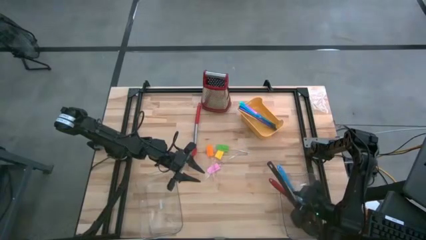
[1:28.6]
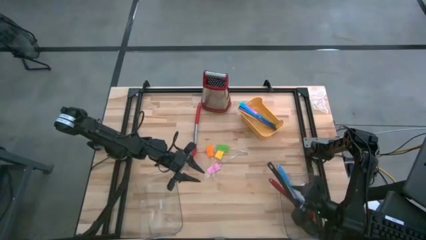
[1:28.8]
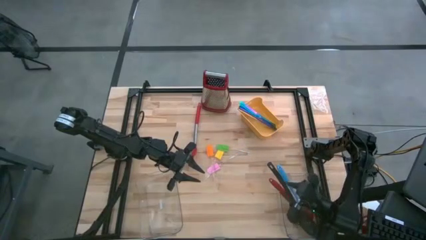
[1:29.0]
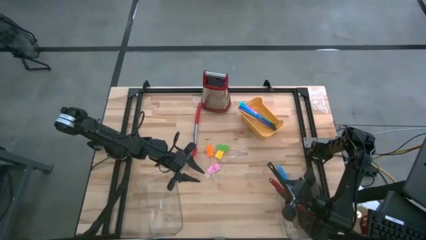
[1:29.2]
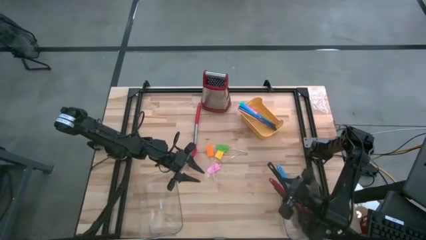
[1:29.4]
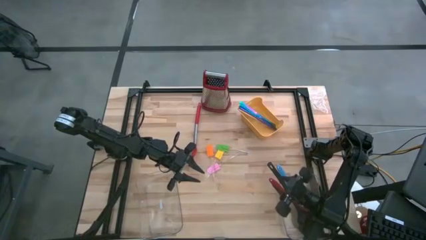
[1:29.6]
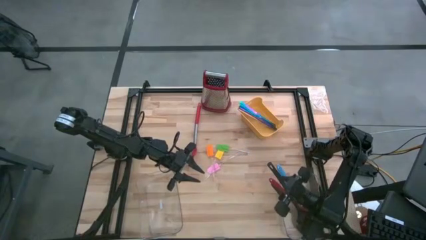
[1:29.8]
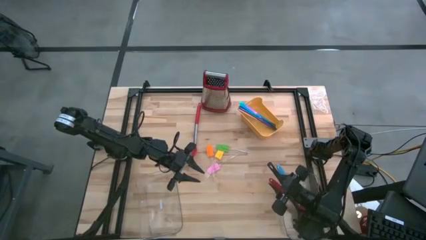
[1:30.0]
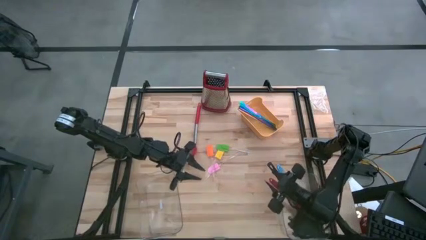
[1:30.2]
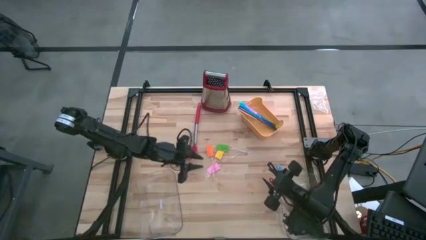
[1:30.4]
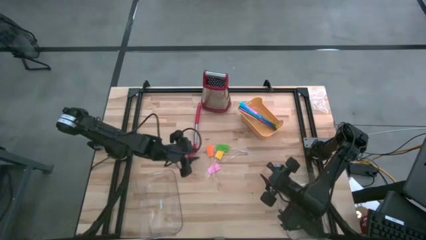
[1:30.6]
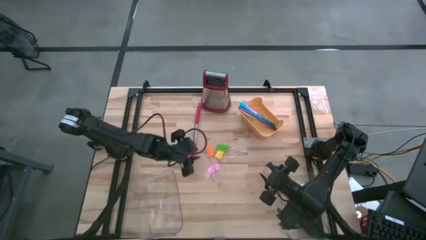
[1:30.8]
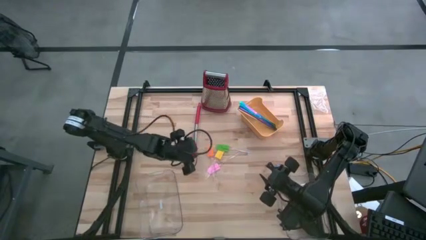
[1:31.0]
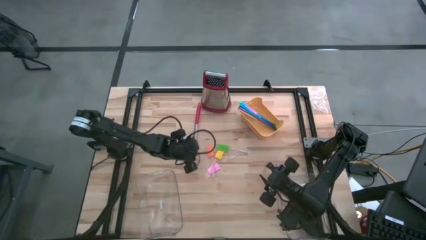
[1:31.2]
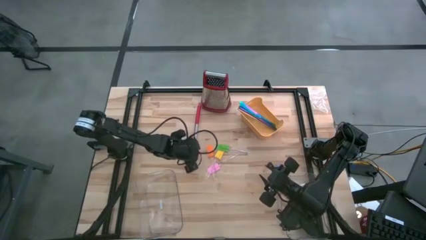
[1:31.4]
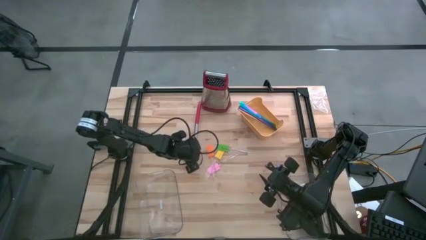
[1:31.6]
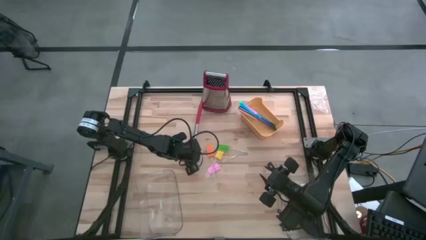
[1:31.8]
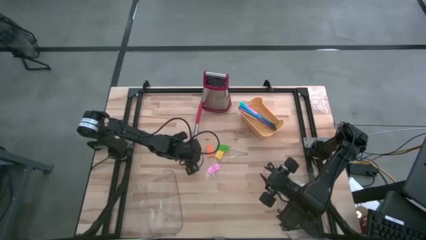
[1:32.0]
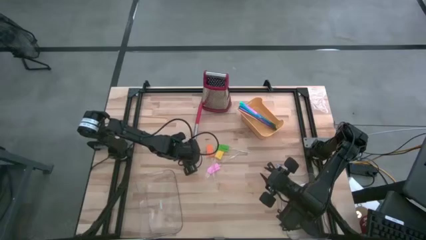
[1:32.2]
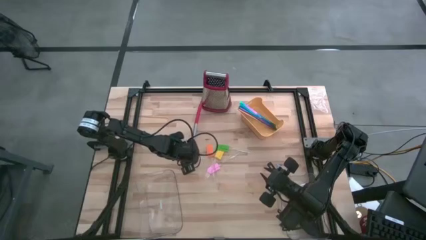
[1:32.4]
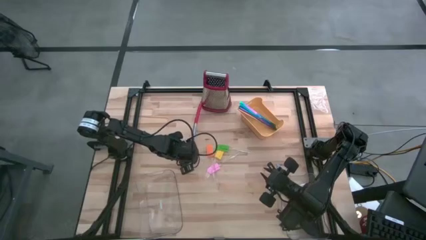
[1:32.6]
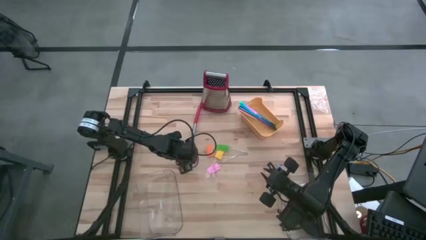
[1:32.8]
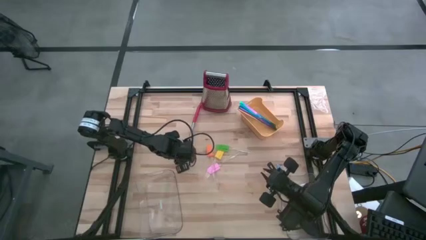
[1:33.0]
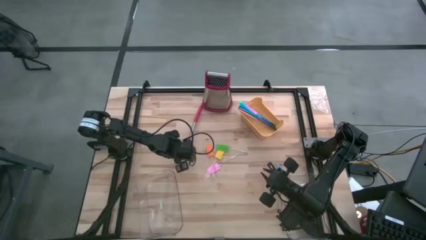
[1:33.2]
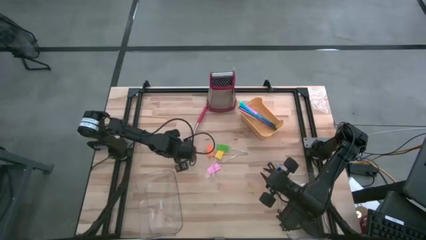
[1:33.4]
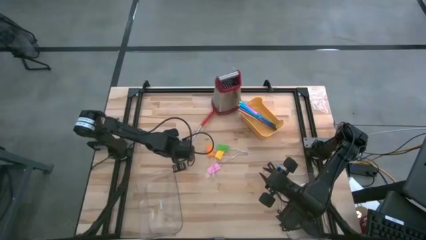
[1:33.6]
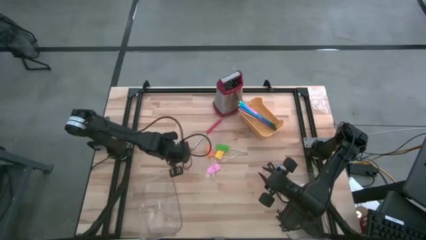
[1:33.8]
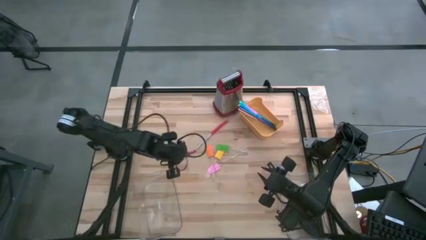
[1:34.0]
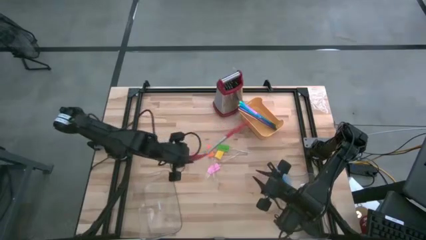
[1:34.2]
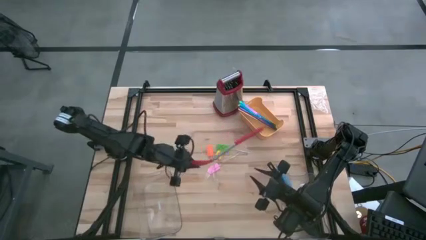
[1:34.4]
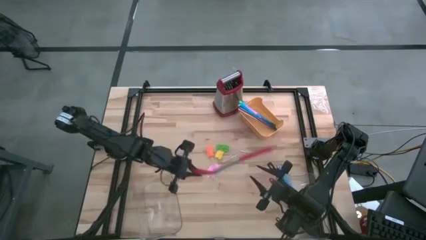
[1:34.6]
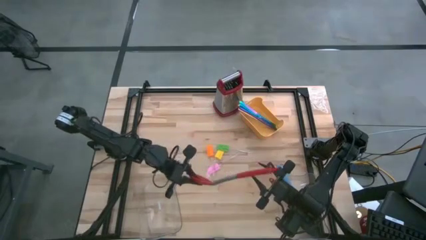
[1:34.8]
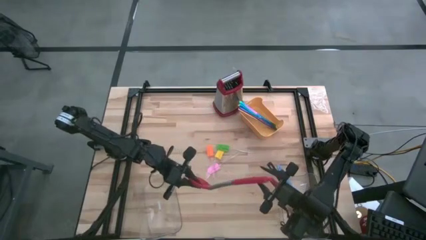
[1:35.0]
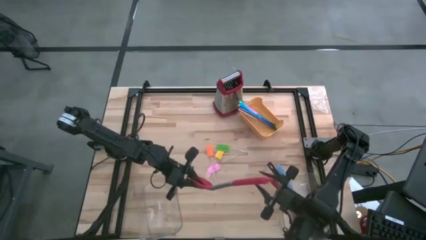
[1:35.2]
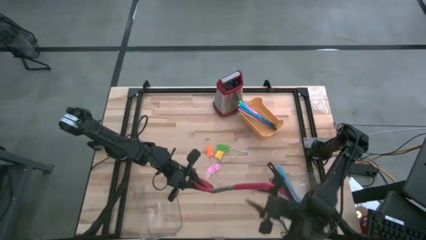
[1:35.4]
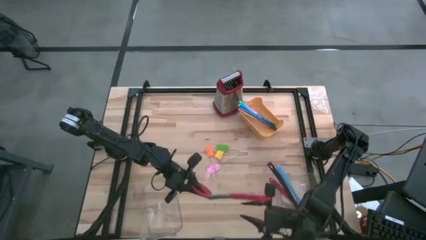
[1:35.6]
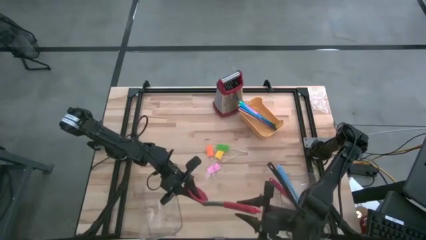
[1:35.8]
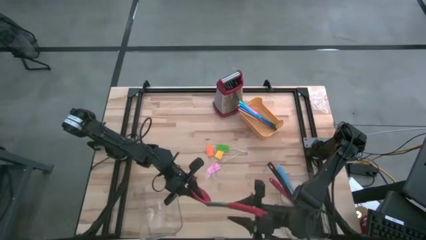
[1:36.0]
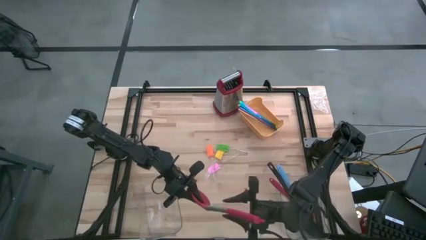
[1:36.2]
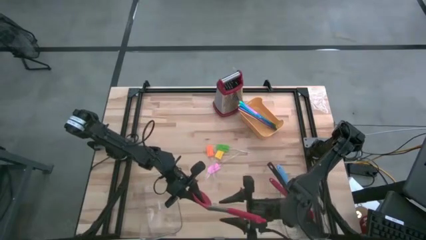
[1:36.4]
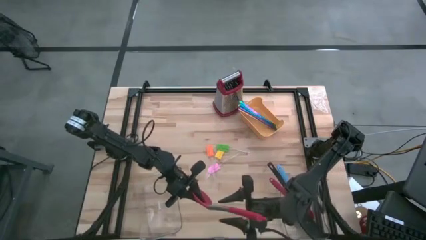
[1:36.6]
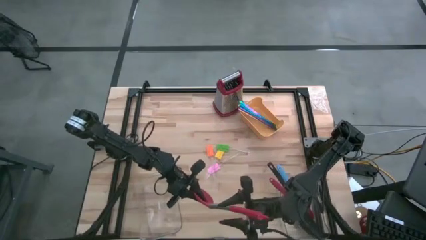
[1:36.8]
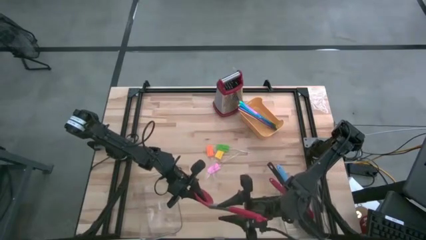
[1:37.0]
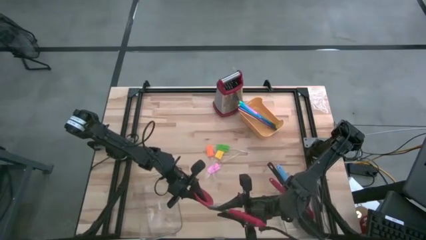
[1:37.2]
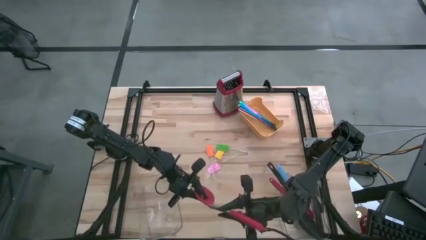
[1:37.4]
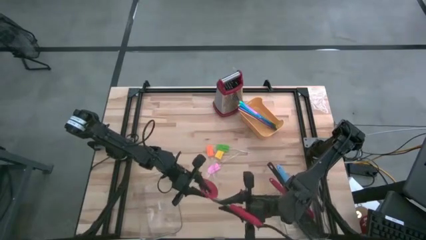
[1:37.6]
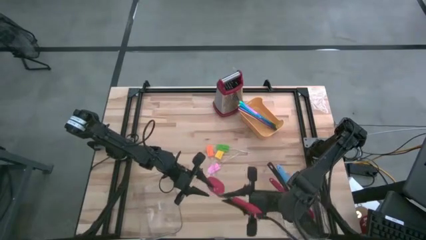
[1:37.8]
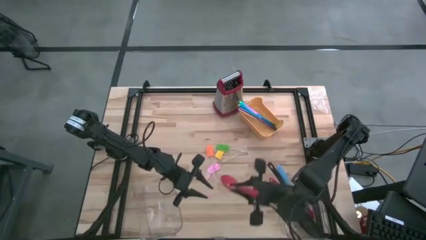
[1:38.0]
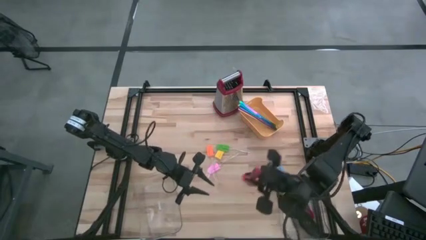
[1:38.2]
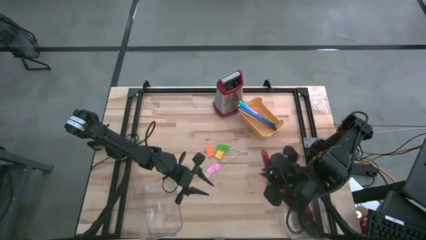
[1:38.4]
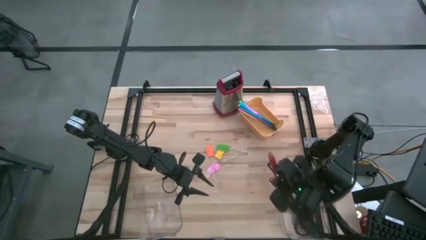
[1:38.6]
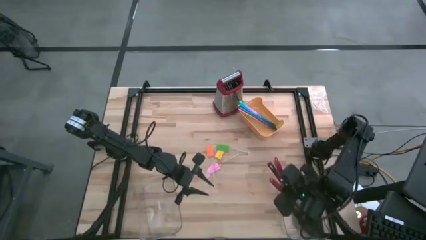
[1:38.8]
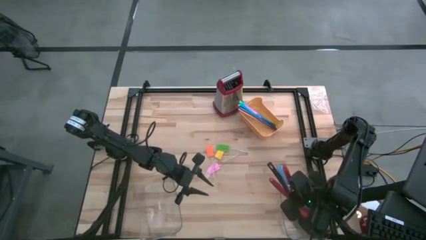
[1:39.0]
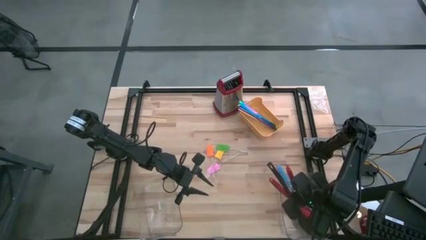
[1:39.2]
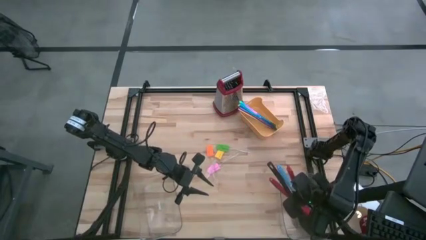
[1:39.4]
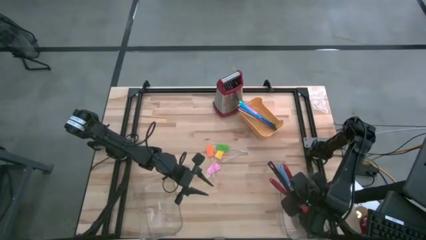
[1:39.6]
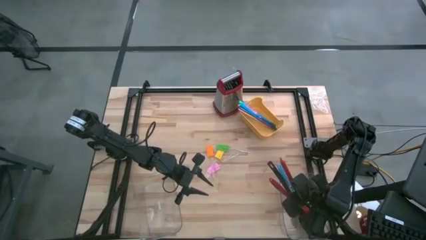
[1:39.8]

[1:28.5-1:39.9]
Task: Pick & Place Kitchen Items
Put the red draining spoon into the right transparent bin

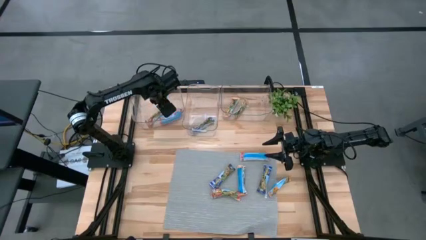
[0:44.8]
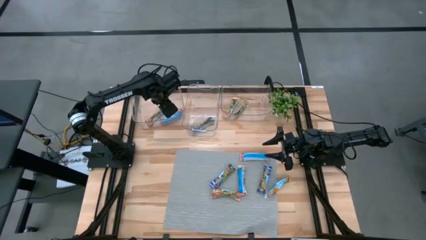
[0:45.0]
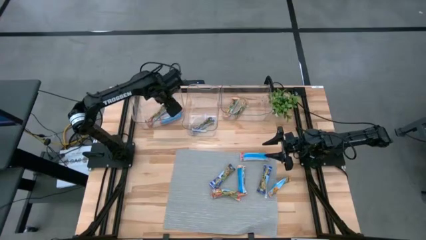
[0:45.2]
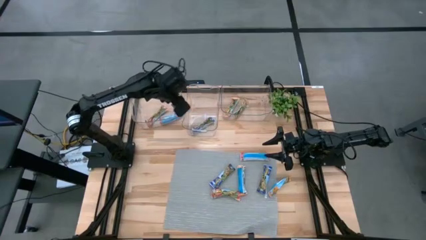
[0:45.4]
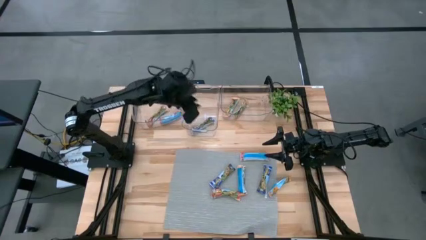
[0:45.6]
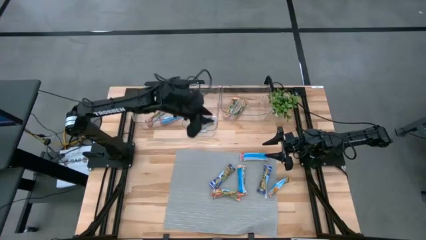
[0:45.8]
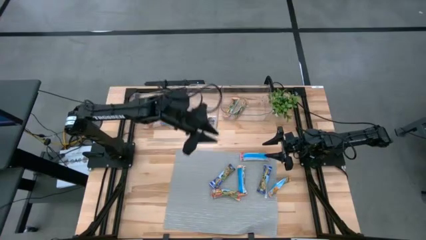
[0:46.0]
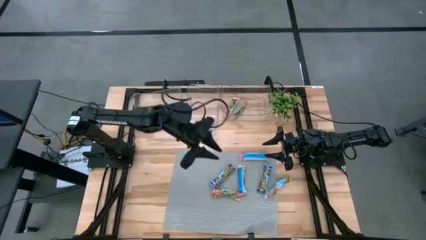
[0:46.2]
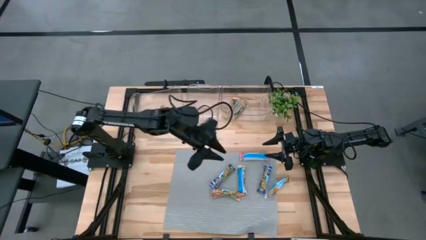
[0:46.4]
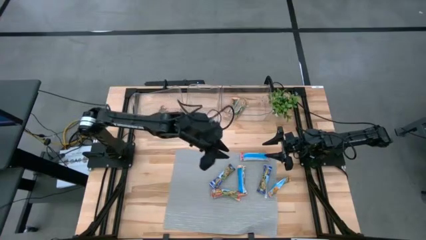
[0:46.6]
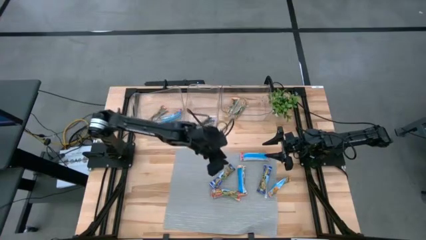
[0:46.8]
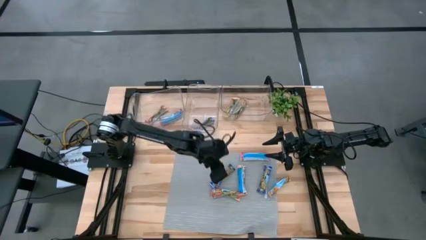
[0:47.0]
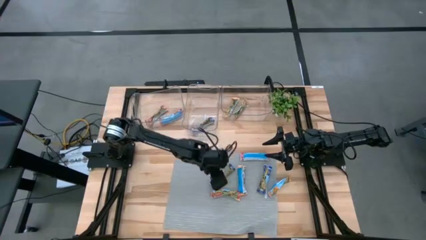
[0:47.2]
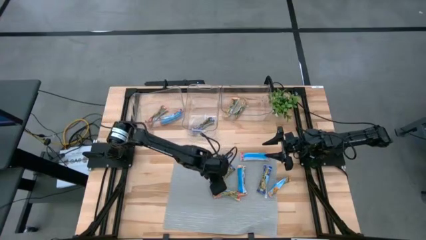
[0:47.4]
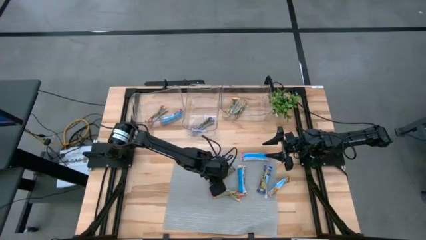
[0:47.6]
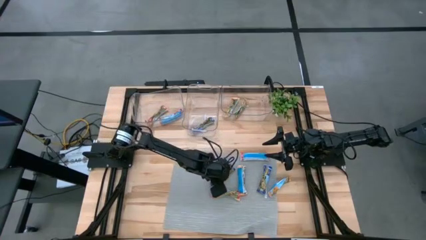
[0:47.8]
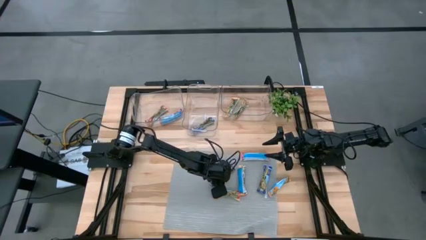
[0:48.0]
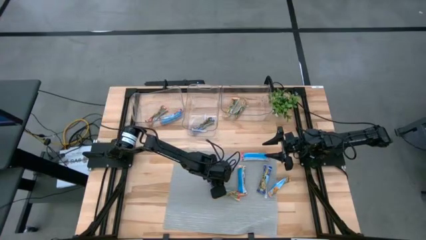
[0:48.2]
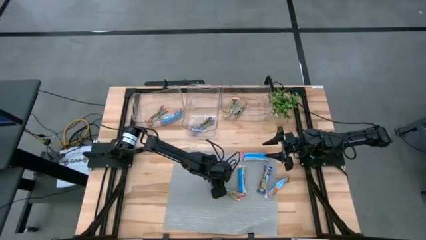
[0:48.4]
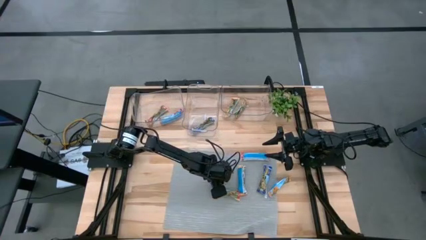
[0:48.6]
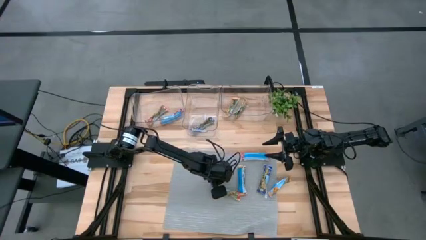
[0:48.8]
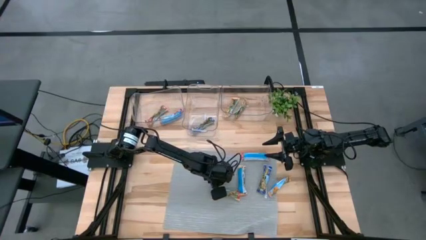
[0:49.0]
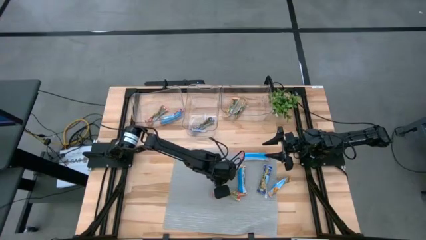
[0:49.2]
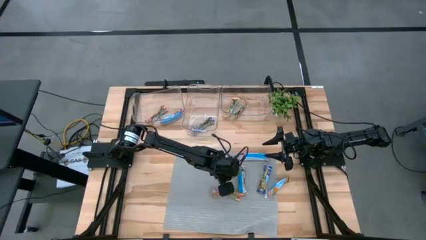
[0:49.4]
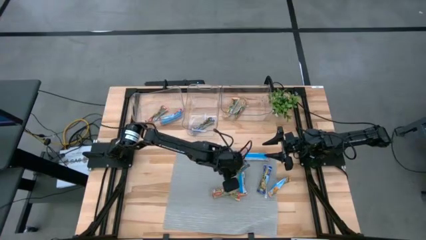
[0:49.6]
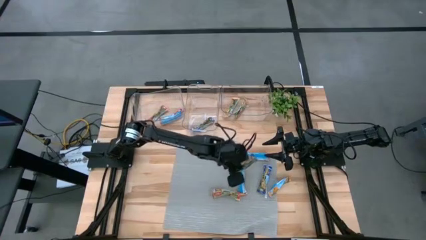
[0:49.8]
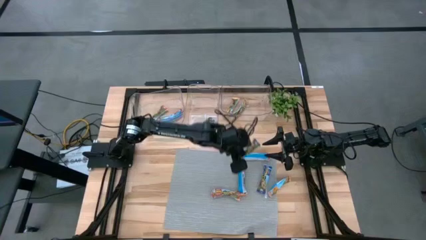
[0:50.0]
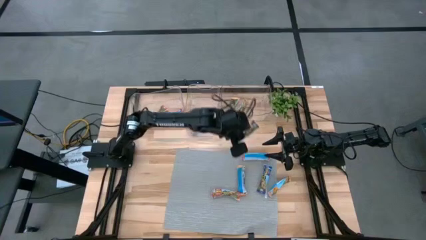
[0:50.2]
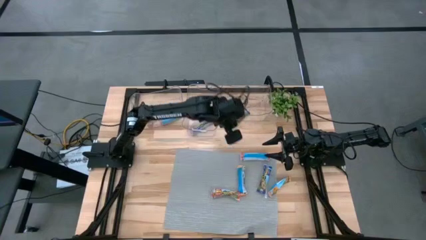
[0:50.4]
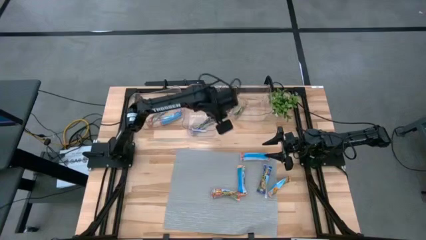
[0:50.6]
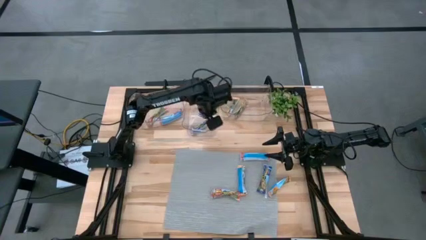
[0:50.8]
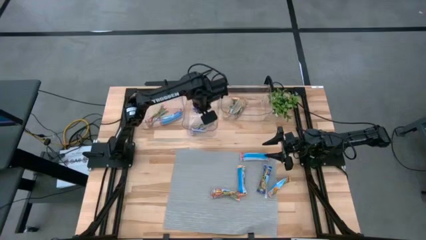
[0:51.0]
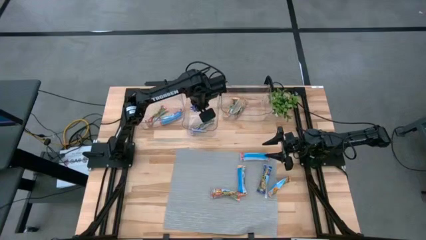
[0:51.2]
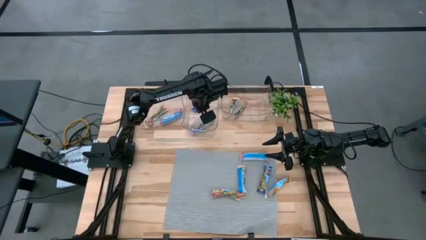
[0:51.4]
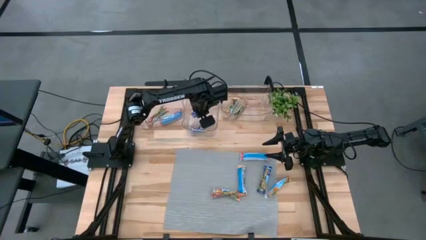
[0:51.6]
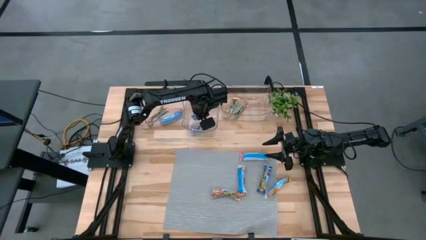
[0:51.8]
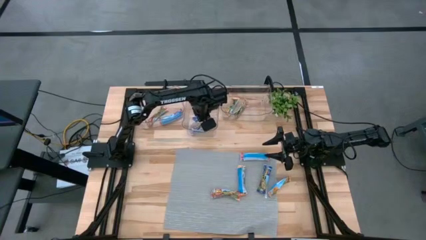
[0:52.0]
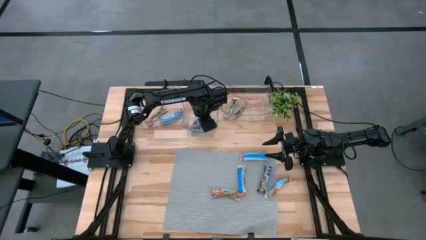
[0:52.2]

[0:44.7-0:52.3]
Task: Pick and place Granola Bars by type
Put the left blue granola bar into the middle transparent bin
